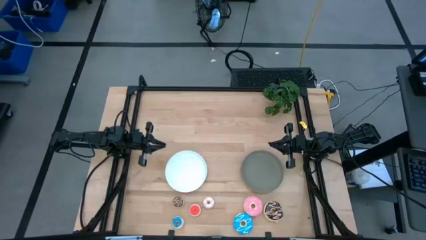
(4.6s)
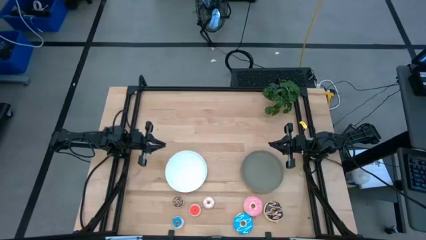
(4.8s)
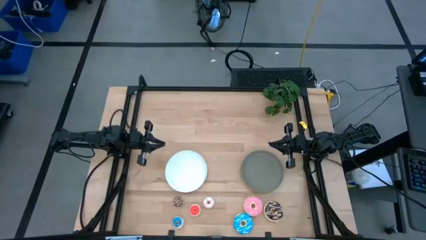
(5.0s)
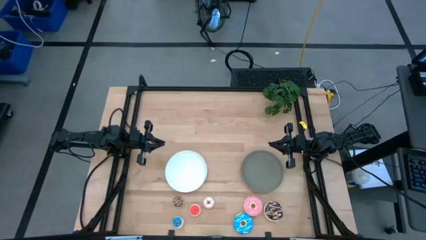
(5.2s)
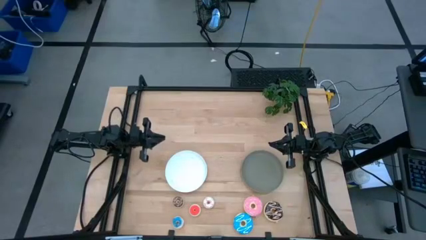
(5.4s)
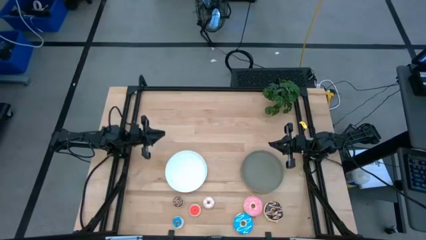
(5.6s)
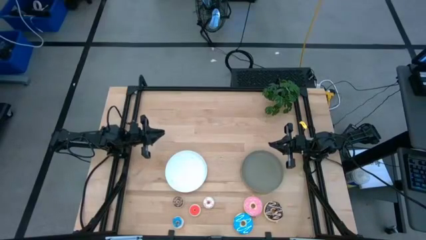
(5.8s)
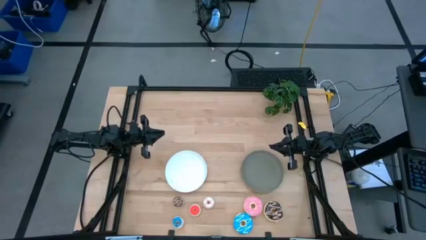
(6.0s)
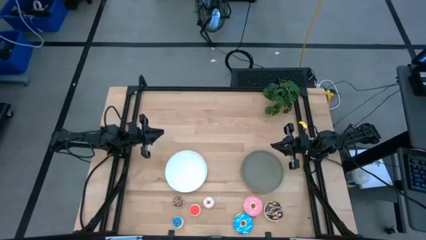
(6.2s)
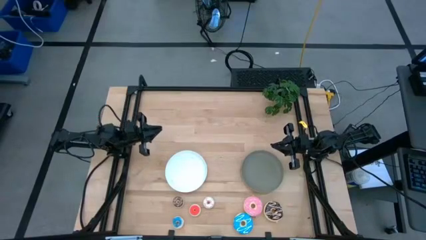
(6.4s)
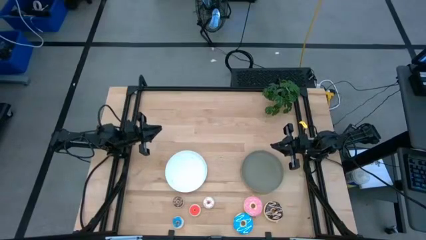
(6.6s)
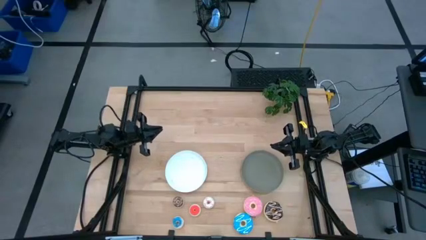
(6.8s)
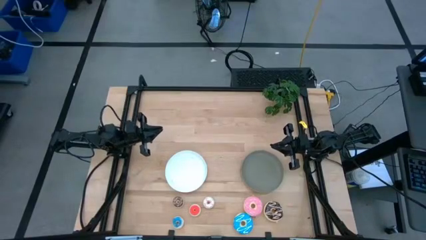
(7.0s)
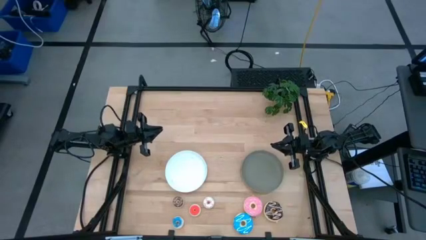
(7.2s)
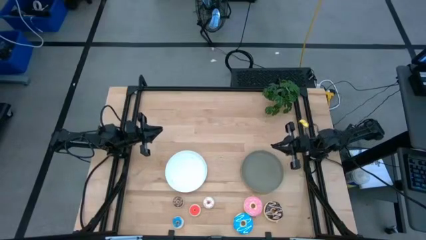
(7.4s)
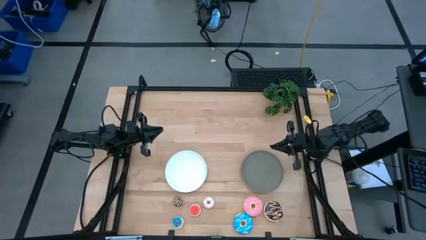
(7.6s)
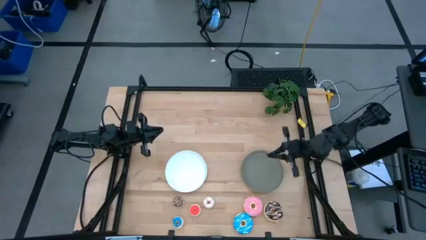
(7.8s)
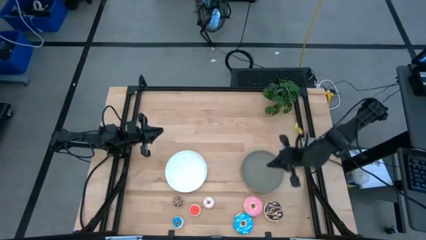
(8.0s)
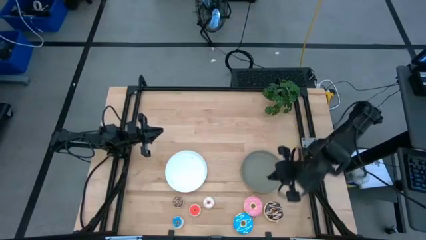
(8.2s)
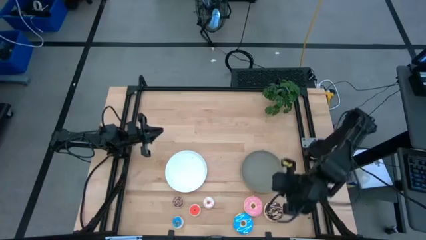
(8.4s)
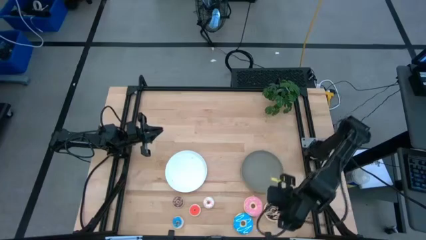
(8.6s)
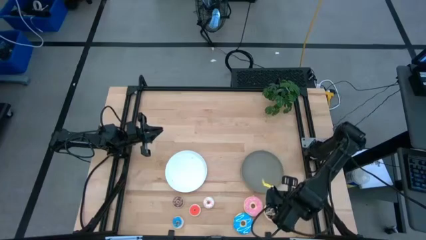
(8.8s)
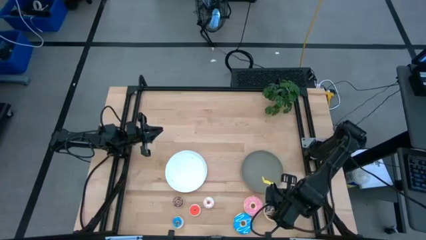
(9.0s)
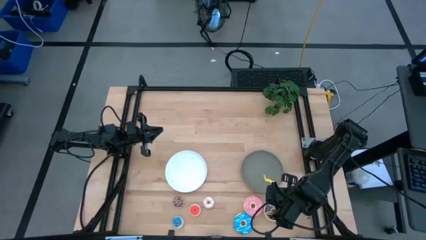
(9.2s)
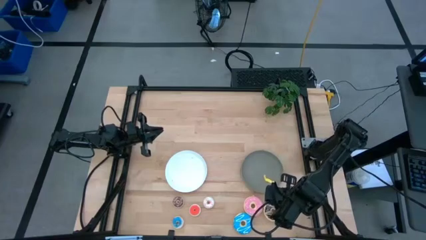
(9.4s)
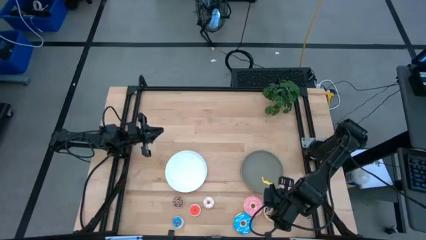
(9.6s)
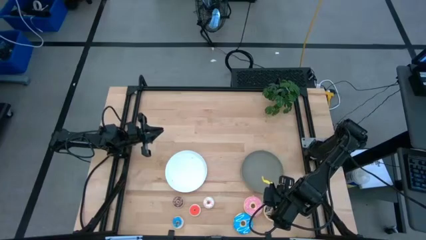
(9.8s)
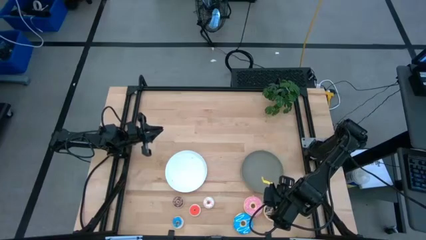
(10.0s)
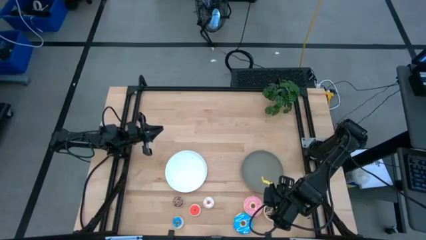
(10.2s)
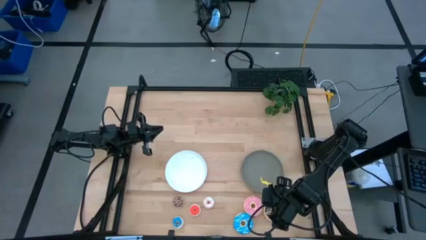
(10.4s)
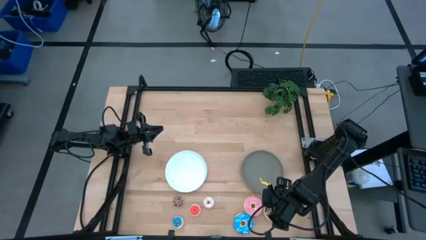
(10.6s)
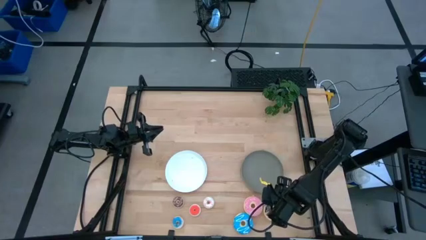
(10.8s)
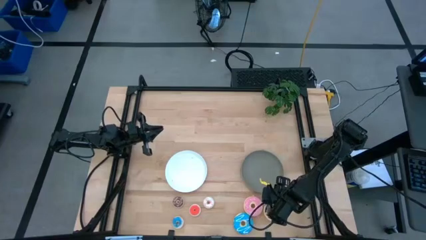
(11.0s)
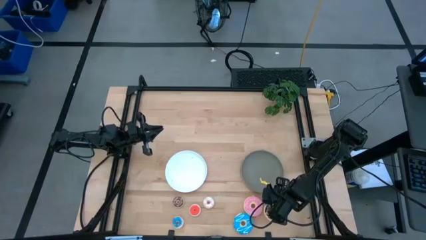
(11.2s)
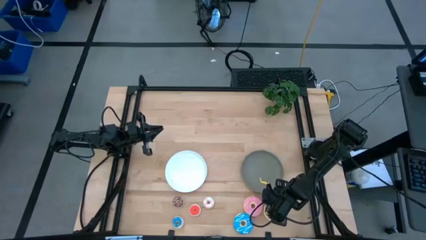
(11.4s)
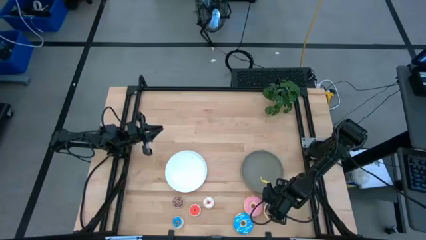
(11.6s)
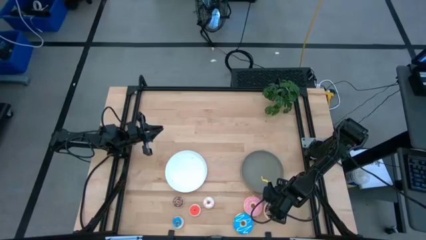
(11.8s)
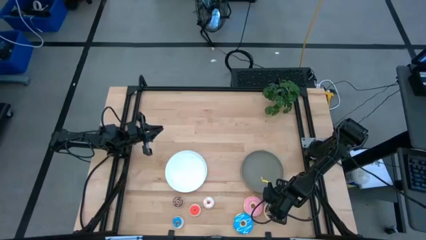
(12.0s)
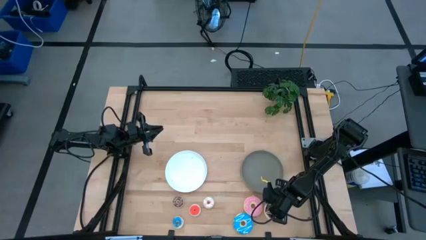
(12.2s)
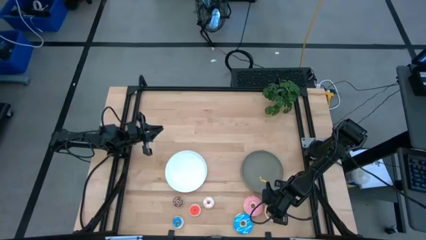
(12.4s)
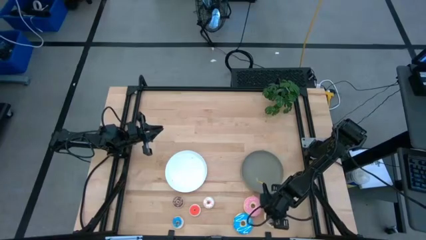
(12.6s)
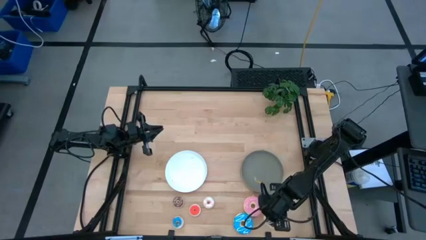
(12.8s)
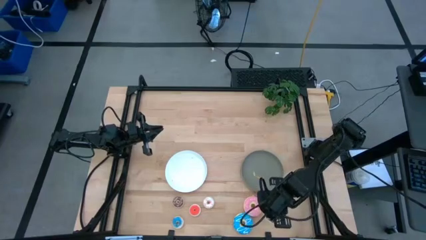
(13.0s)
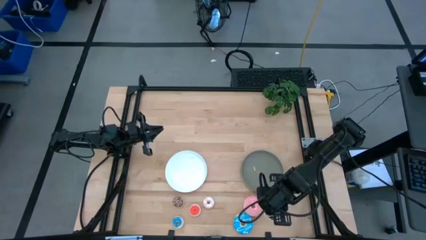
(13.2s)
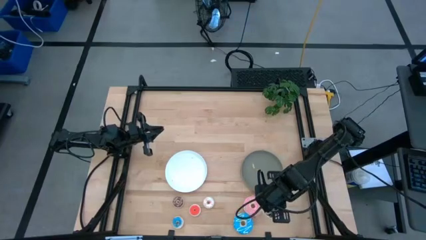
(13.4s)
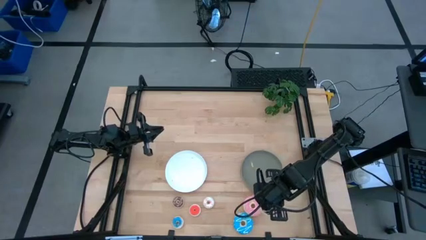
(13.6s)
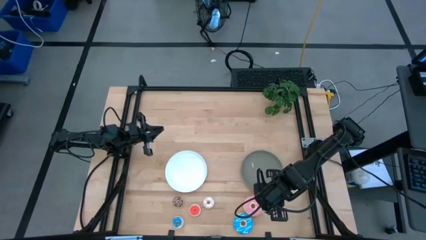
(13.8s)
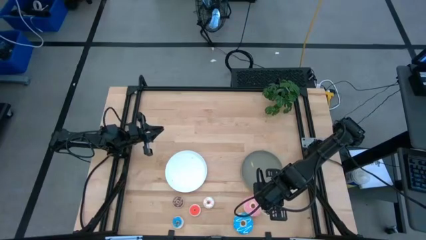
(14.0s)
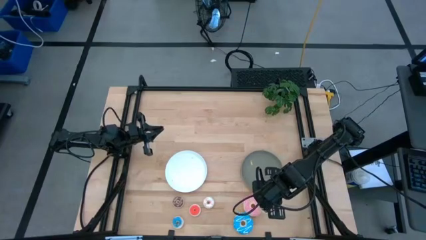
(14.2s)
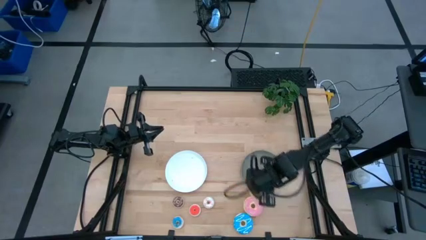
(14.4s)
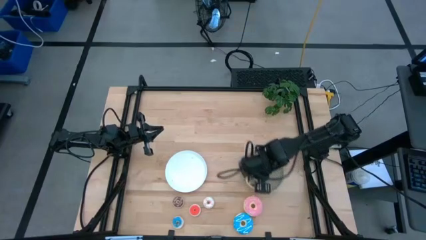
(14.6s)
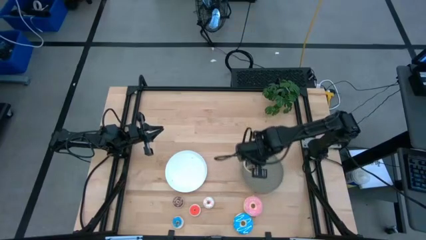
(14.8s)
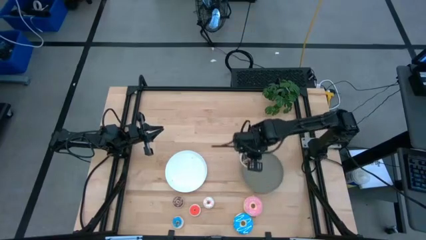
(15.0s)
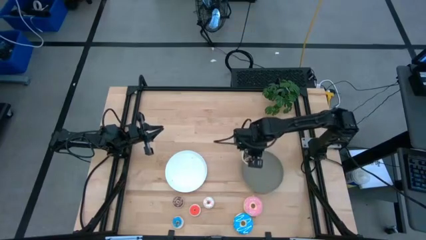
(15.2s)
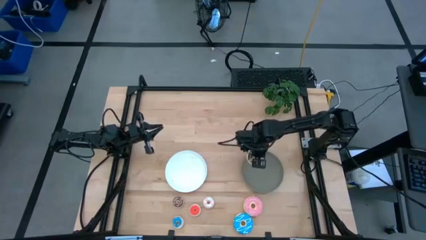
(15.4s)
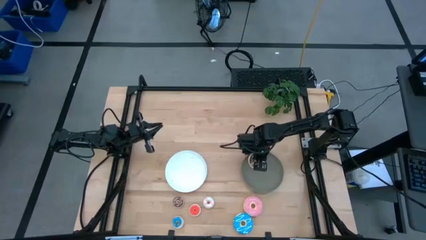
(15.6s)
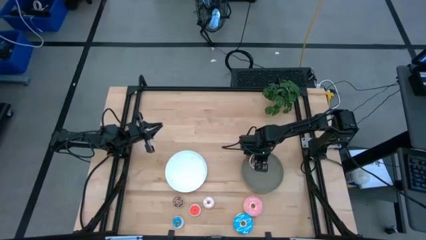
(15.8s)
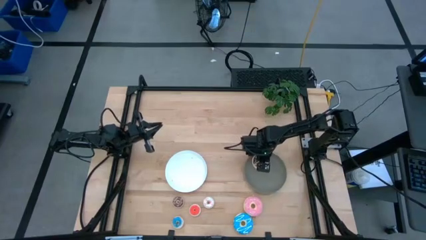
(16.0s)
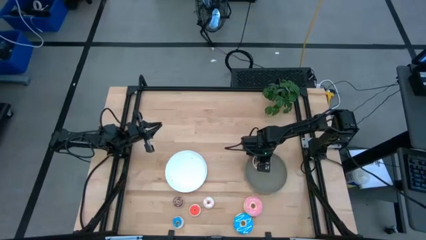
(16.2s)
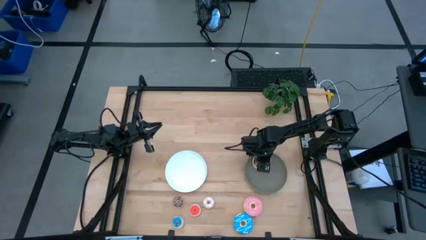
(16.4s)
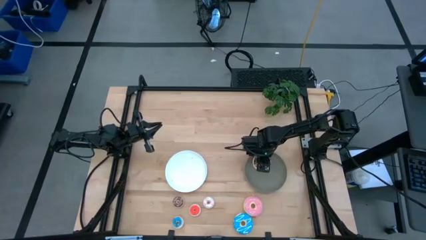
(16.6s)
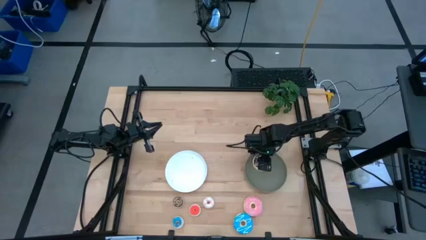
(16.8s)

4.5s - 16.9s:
Task: Pick & Place donuts
Put the large black donut on the gray plate

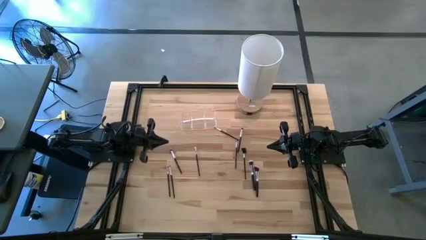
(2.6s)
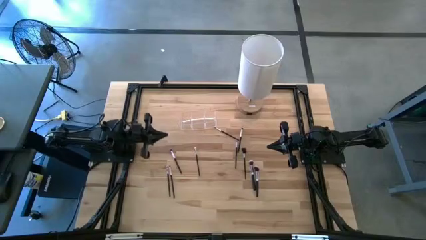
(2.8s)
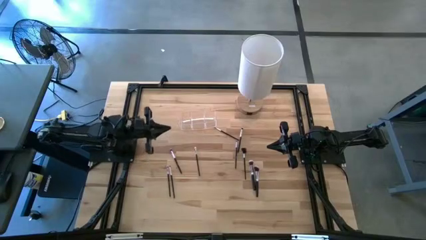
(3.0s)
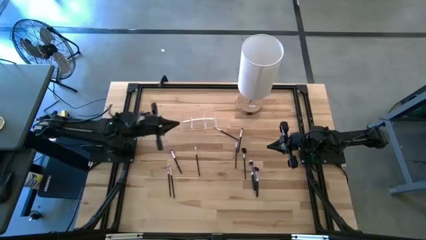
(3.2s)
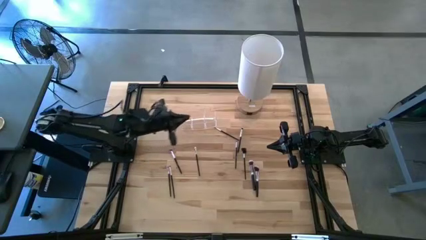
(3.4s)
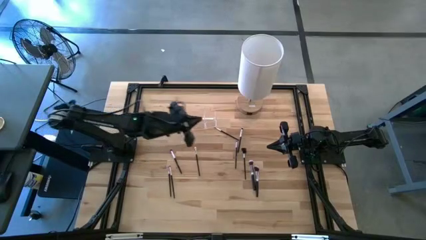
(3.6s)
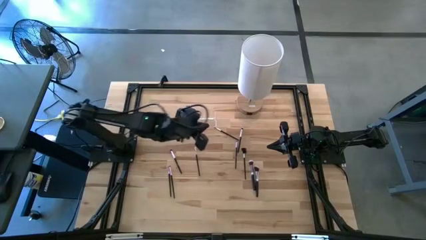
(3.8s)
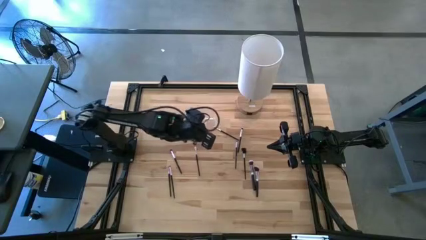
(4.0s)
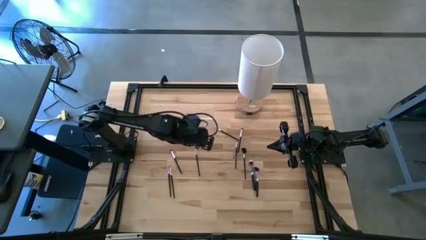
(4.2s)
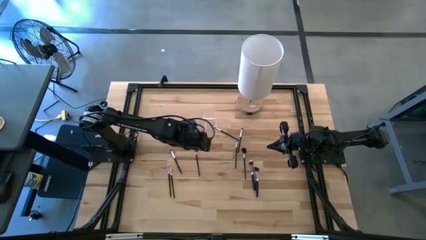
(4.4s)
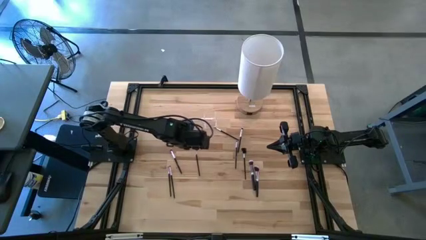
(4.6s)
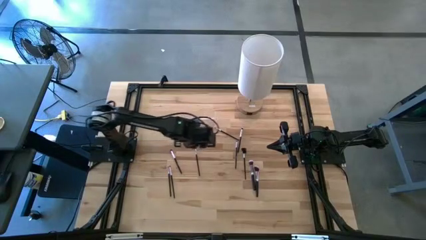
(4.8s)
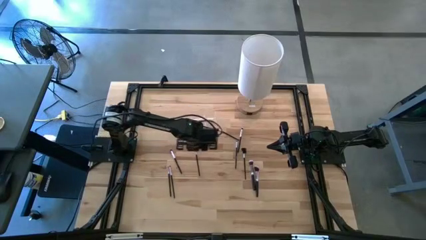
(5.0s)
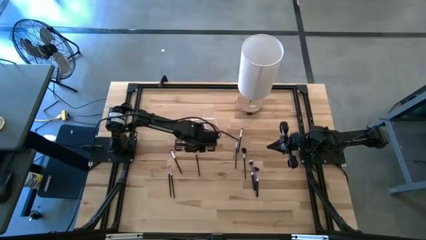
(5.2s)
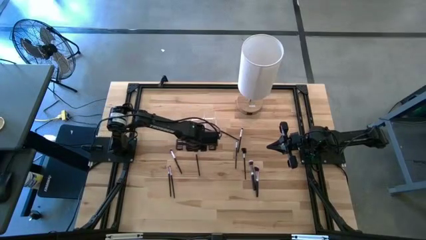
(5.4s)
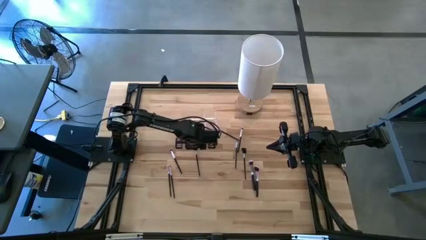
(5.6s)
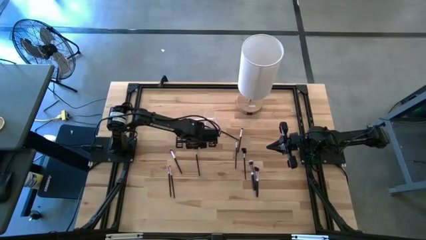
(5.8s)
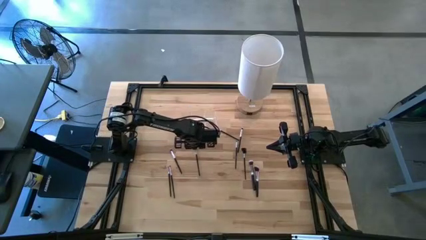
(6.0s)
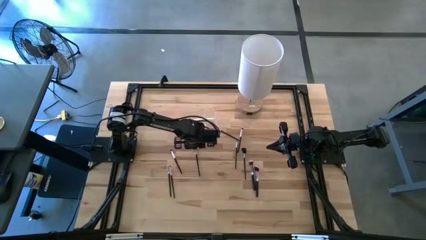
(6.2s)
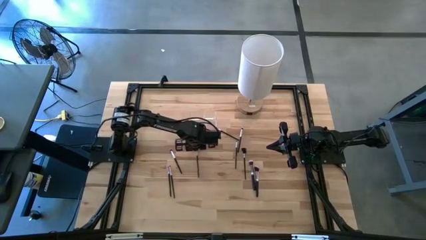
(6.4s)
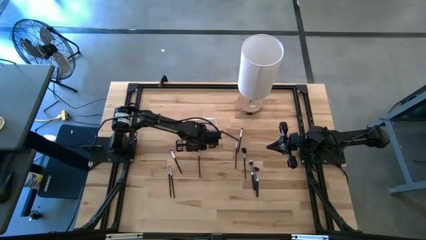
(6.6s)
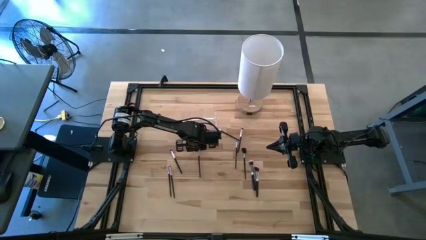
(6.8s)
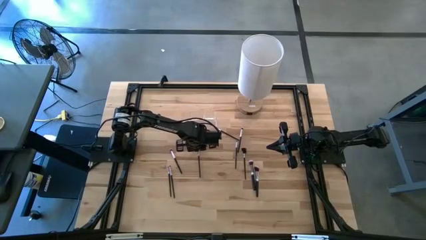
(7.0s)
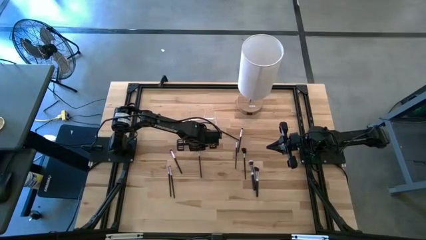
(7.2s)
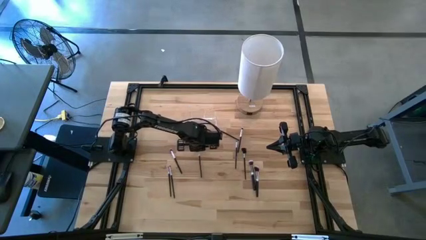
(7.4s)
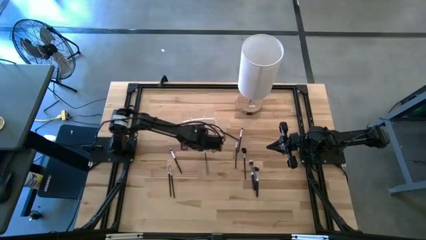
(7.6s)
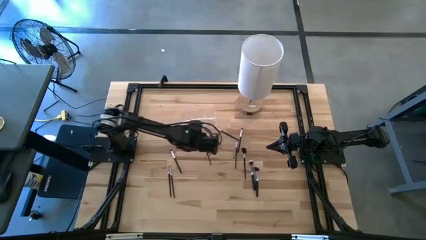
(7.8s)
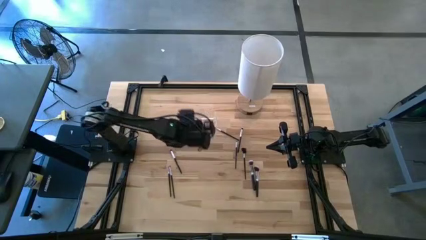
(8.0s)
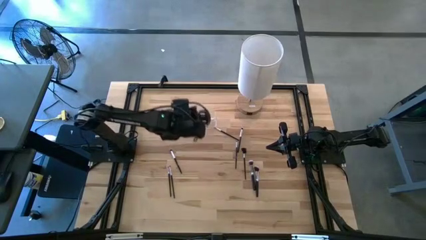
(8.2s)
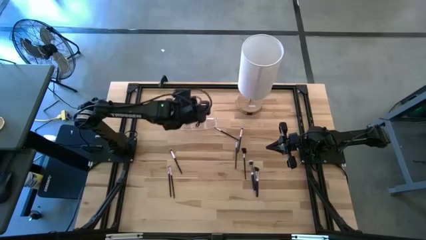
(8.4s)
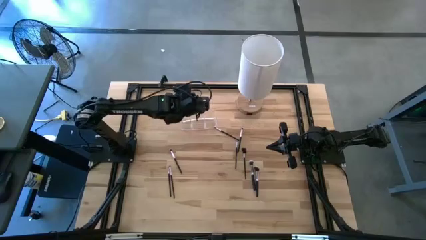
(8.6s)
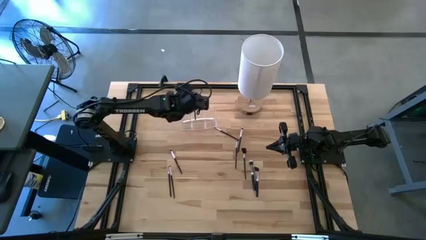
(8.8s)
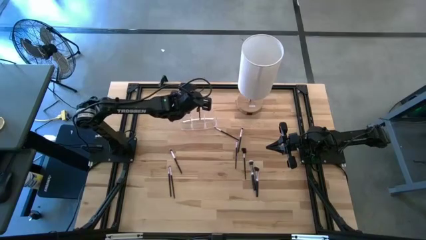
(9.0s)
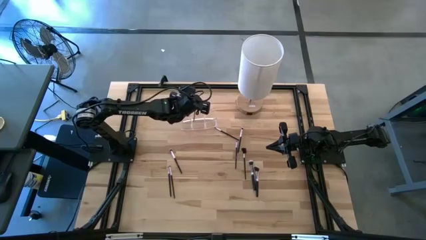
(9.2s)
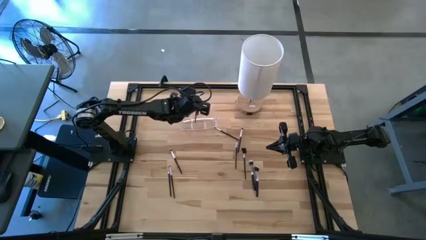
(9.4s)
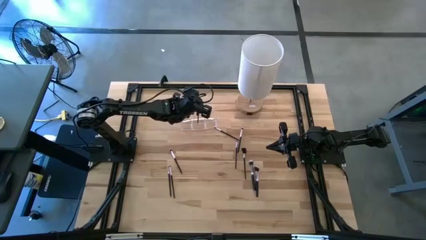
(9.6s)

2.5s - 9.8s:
Task: Put items in baskets/containers
Put the black eyeshadow brush into the transparent organizer
